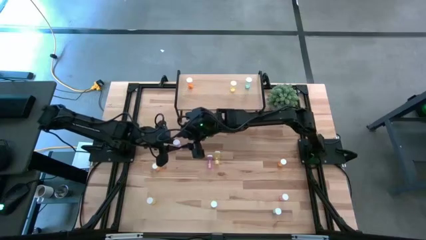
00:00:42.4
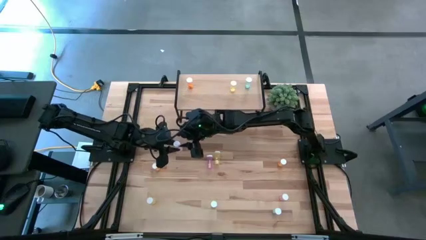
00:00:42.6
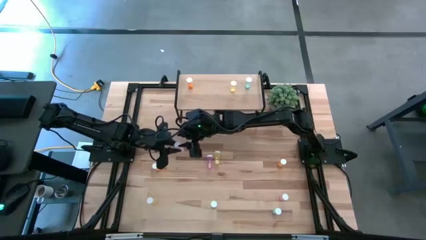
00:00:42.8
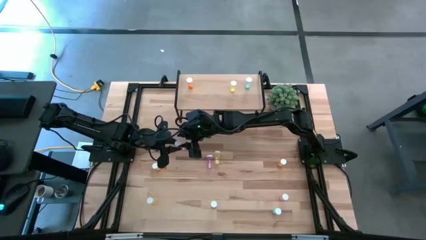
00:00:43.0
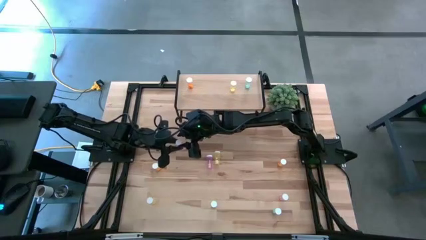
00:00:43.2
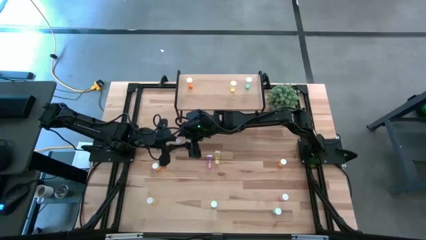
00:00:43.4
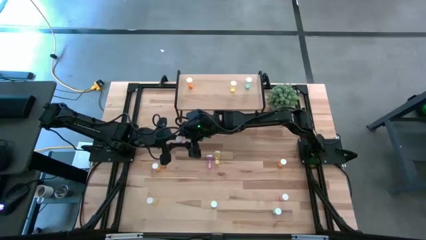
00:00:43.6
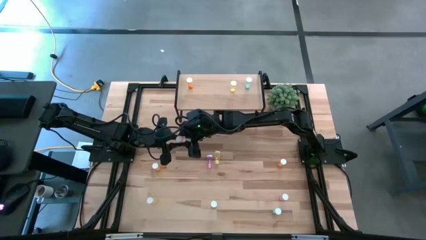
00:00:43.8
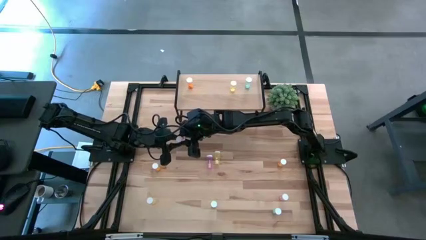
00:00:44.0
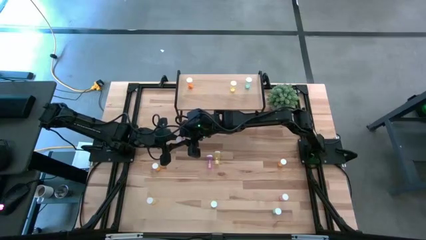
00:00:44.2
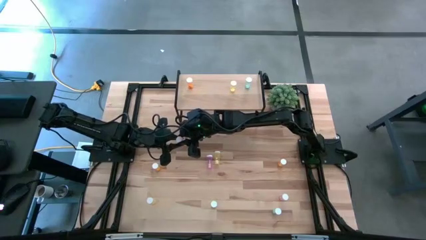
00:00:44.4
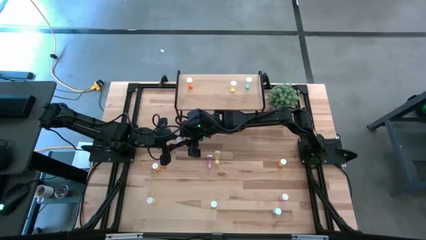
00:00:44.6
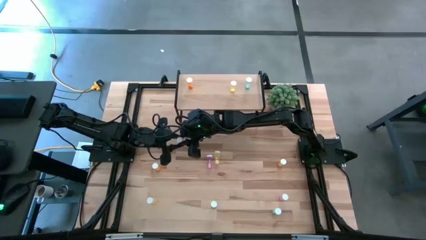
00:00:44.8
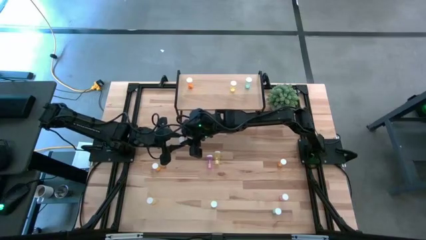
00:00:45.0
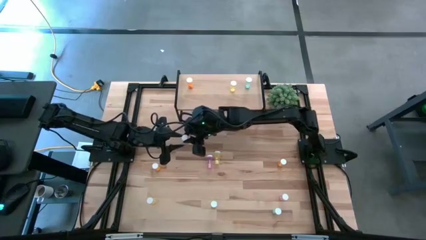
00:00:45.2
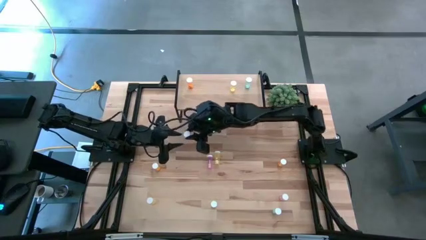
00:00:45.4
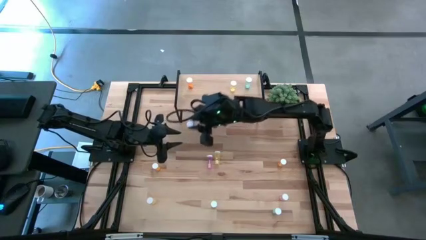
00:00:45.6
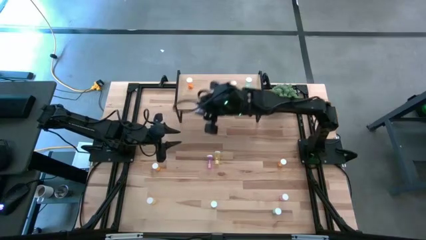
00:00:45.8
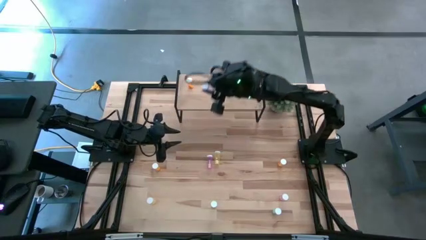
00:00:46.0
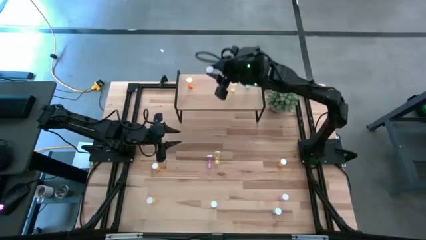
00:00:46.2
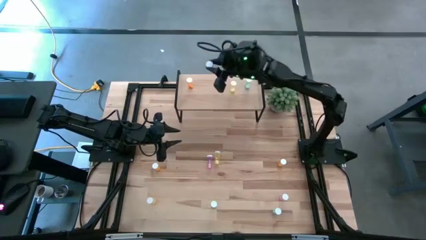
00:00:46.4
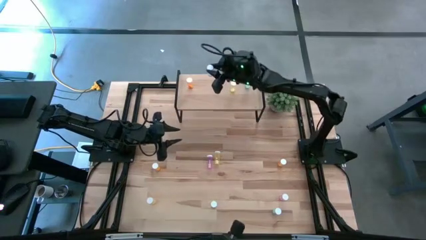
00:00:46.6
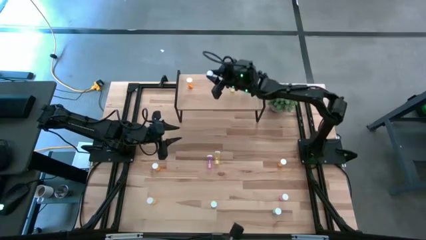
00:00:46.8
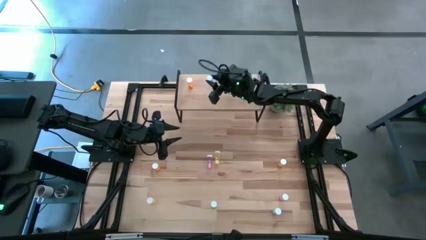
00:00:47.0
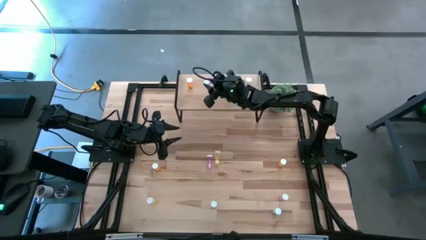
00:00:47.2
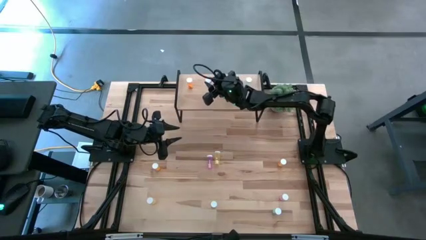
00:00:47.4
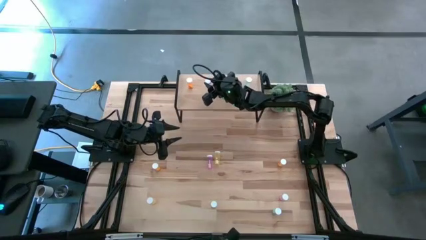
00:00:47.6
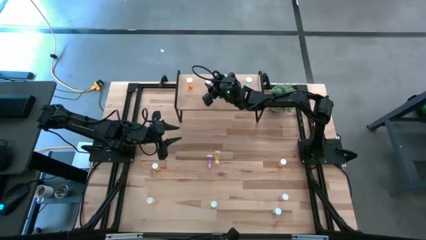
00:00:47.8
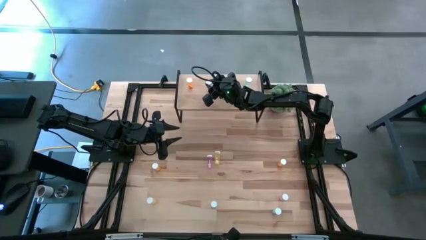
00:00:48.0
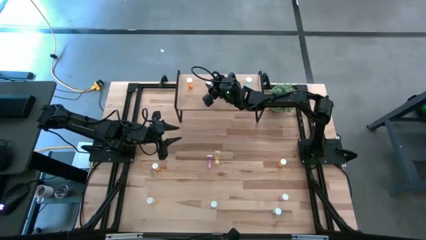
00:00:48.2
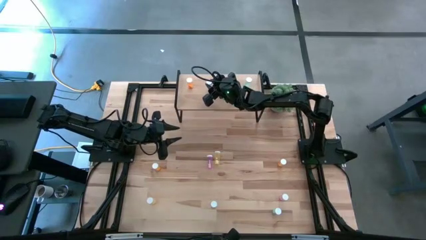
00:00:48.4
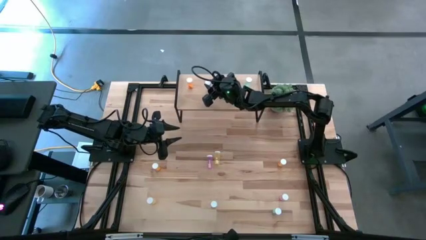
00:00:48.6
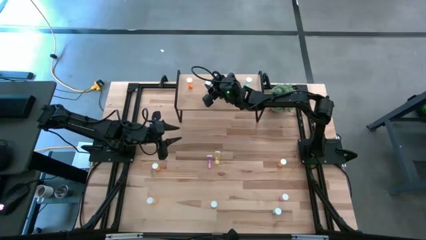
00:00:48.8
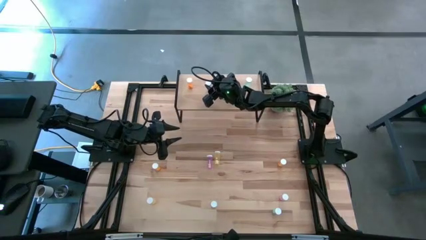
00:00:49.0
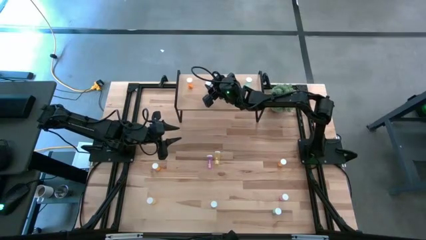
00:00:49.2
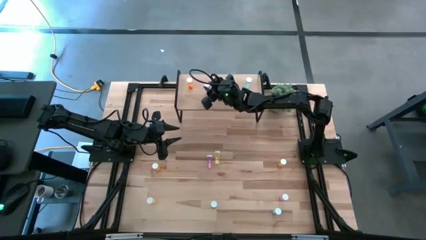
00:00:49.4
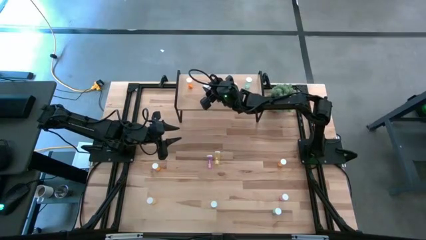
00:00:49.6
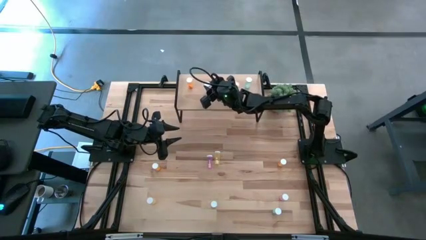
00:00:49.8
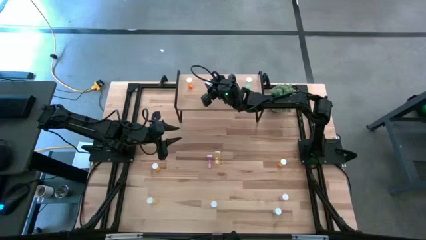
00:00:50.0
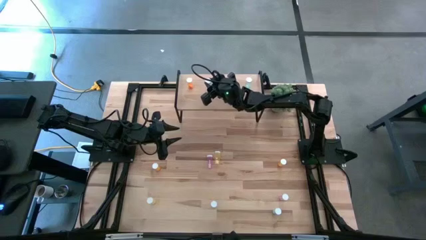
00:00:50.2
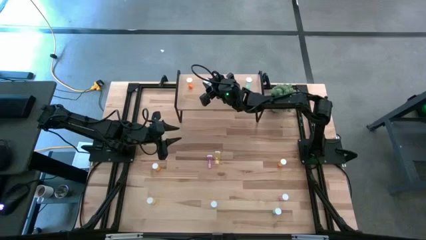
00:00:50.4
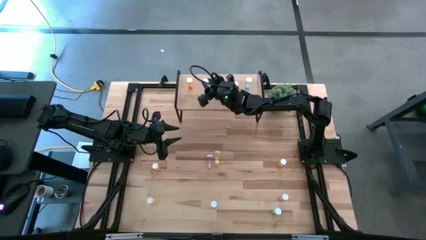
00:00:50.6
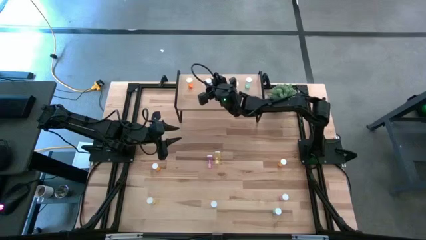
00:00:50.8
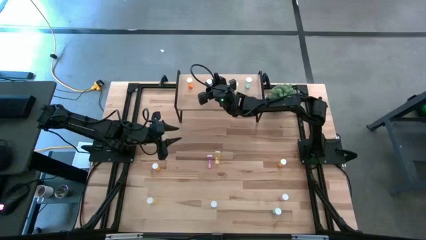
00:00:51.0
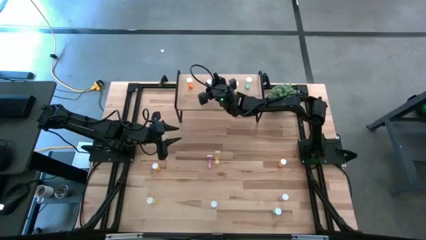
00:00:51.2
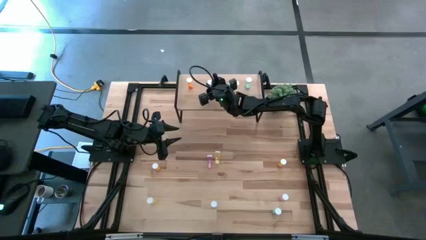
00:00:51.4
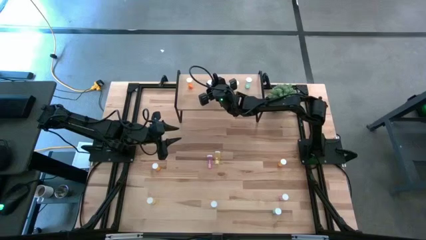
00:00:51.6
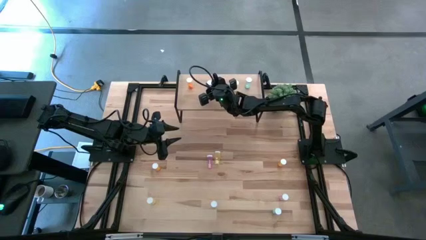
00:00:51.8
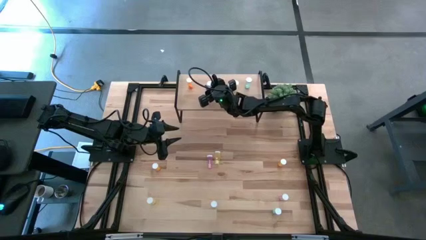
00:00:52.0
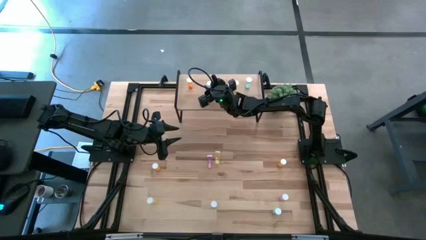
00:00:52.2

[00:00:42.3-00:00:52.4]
Task: Pick and place medicine bottles onto shelf by color
Put the top pink pill bottle on the shelf

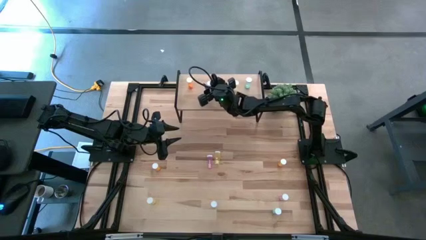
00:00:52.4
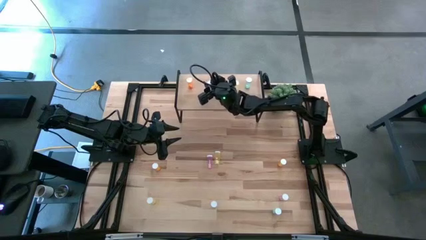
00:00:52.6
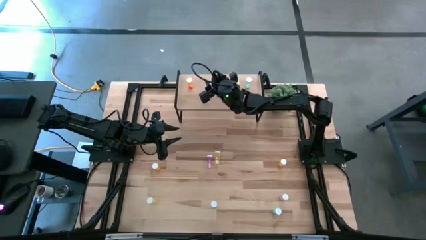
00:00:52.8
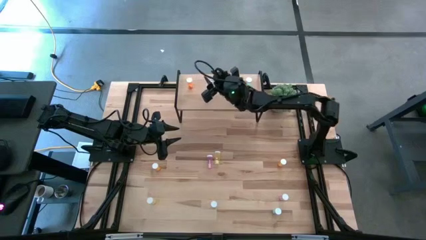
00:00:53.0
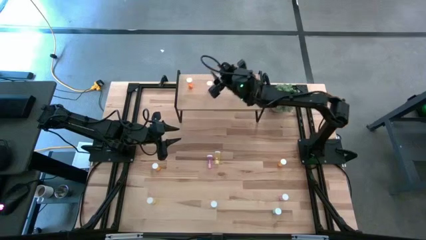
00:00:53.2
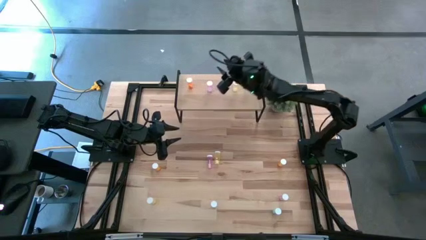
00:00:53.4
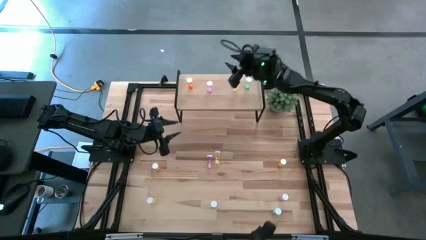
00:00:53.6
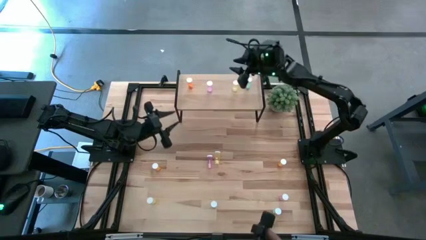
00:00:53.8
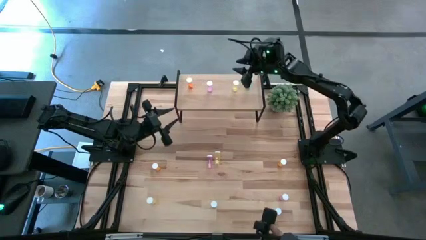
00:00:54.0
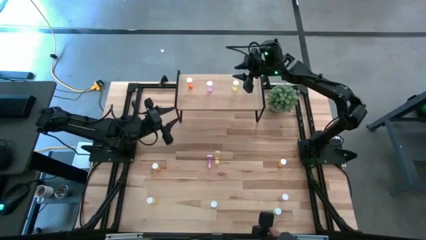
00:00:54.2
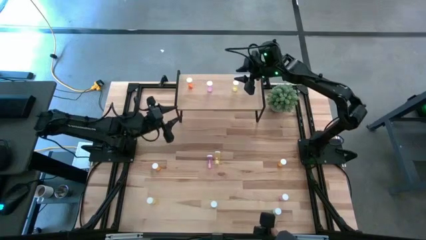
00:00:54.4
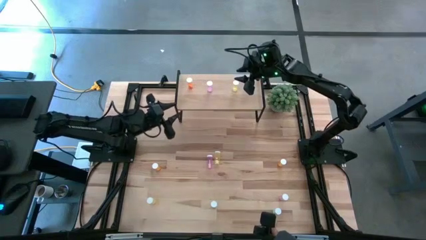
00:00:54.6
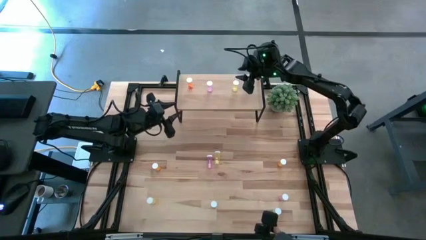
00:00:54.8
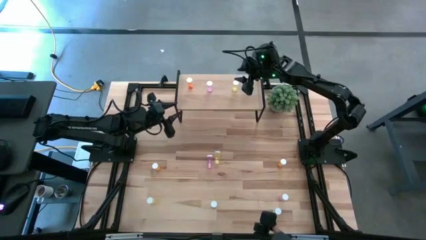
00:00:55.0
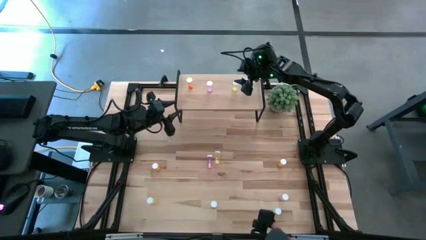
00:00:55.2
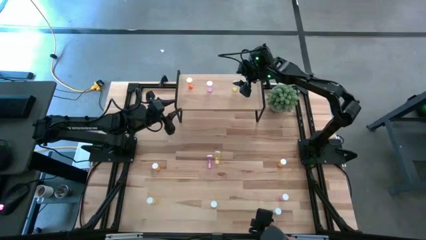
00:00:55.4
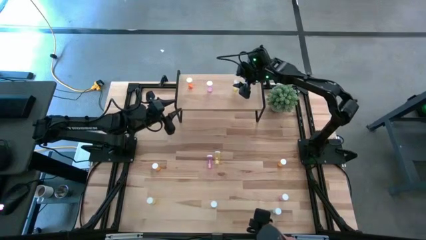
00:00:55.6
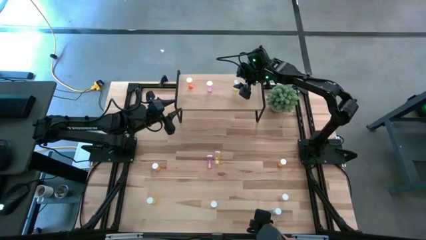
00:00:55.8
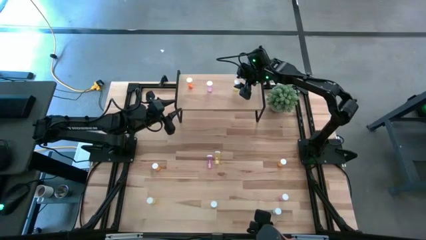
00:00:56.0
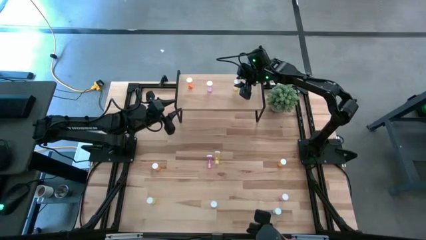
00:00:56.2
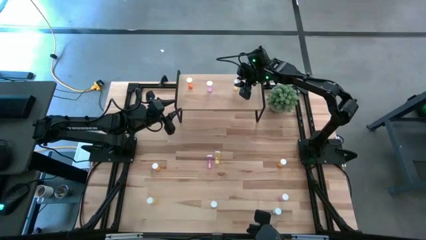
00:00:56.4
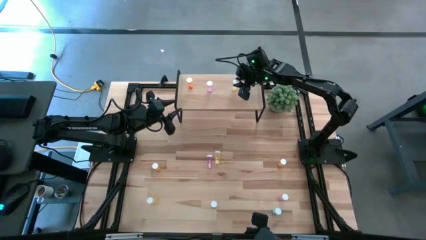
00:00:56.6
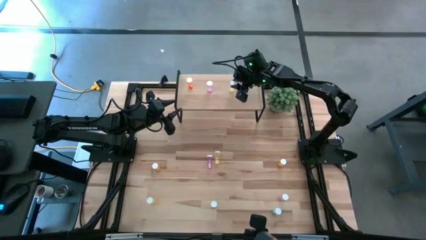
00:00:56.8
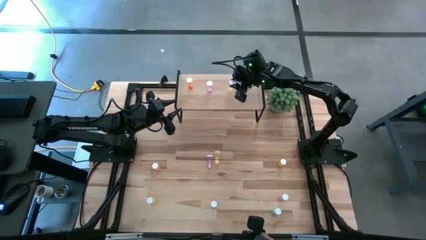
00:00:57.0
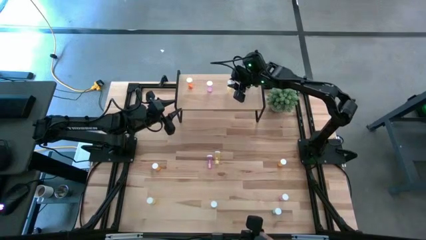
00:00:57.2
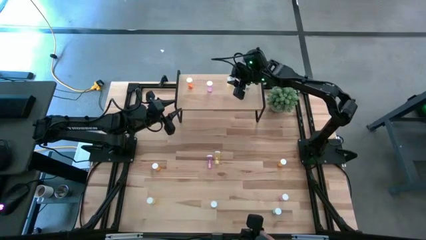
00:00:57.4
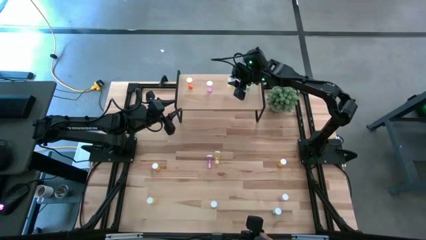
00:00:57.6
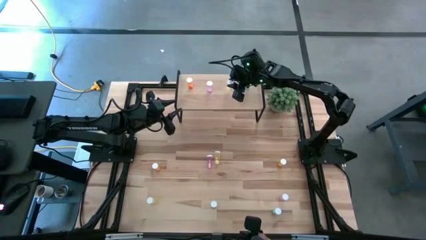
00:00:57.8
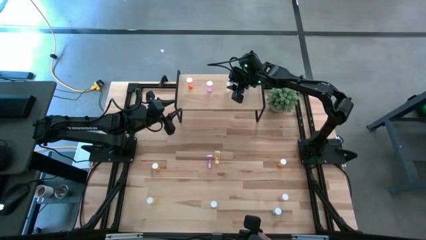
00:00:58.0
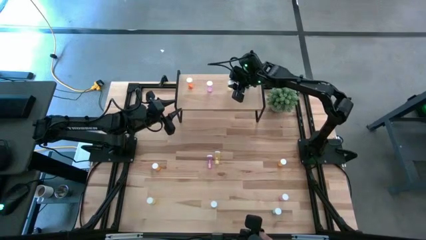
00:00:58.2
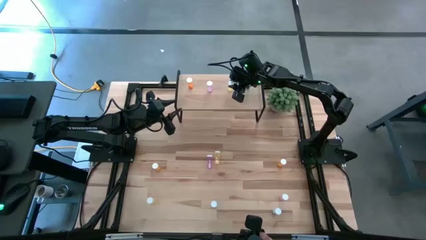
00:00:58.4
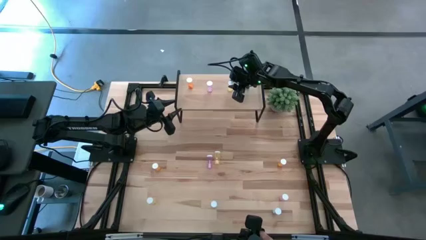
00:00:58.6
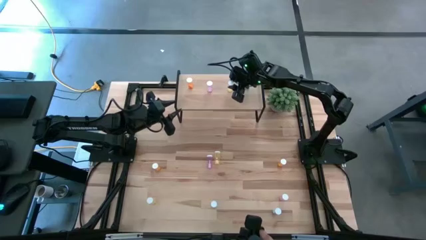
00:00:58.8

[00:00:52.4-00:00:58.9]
Adjust the yellow pill bottle on the shelf
